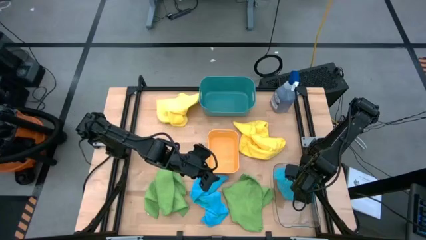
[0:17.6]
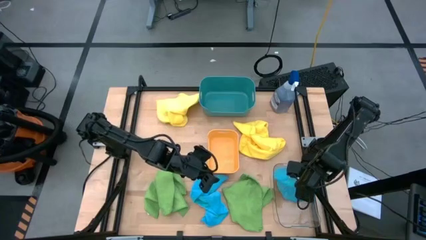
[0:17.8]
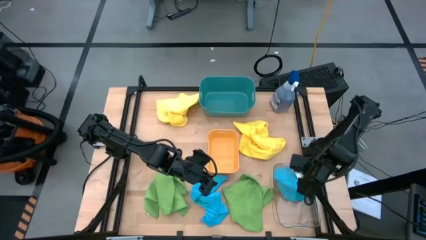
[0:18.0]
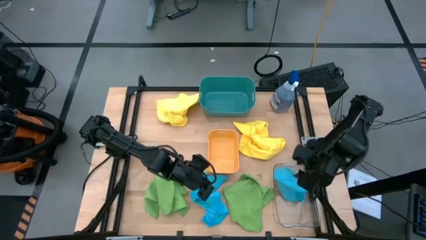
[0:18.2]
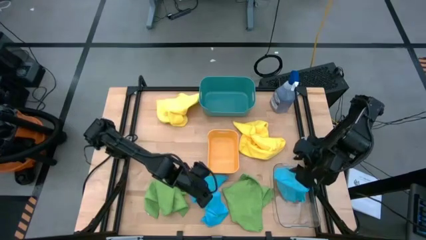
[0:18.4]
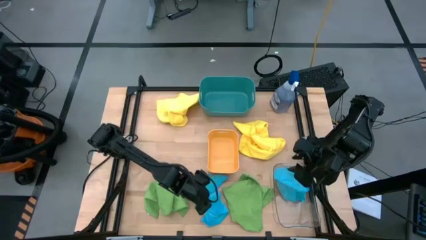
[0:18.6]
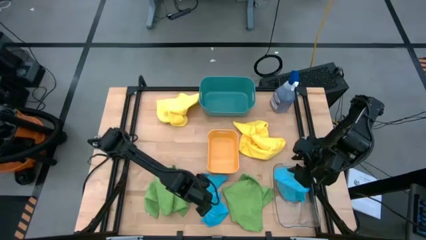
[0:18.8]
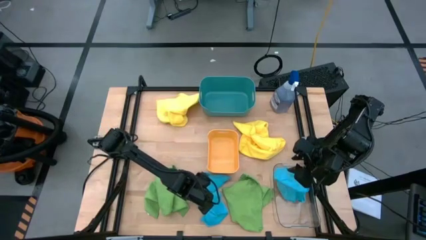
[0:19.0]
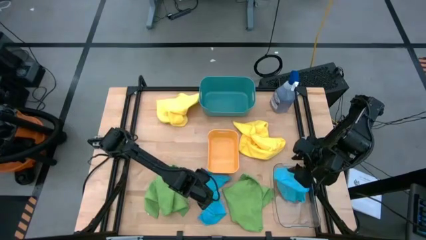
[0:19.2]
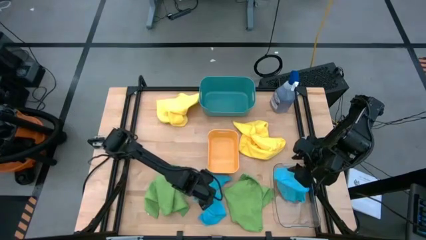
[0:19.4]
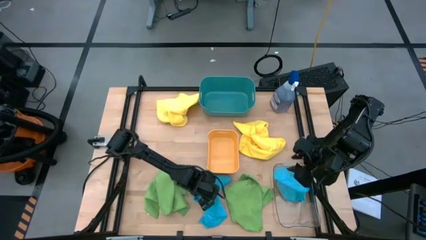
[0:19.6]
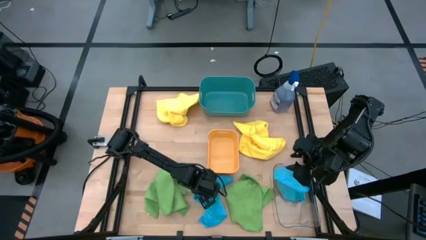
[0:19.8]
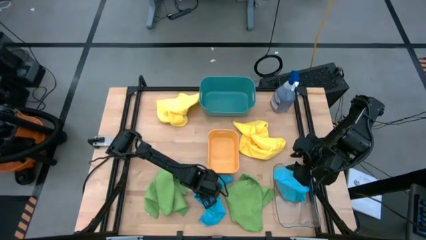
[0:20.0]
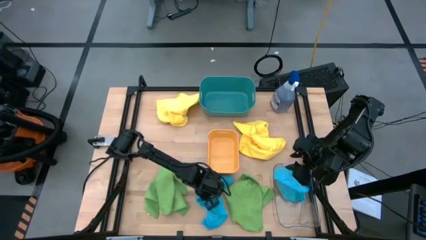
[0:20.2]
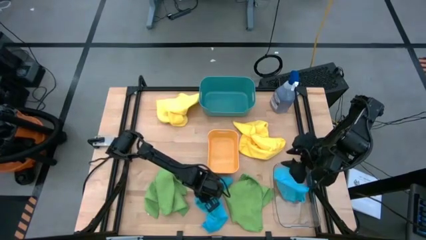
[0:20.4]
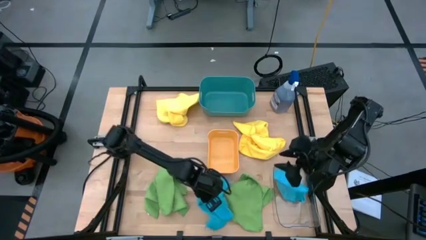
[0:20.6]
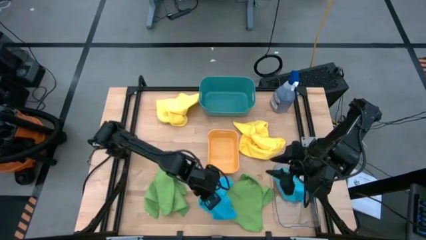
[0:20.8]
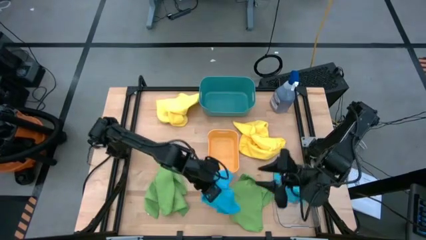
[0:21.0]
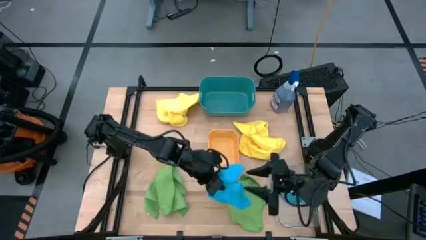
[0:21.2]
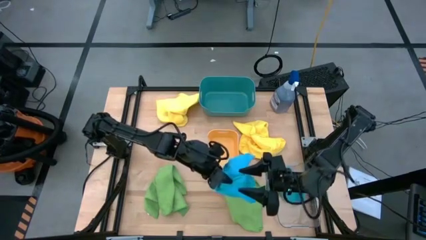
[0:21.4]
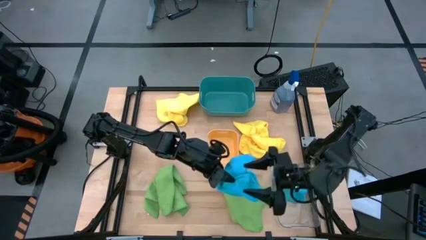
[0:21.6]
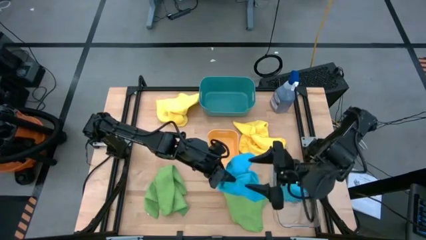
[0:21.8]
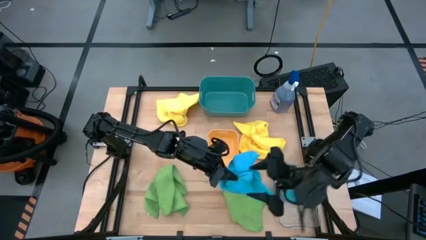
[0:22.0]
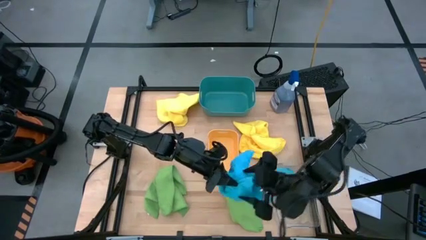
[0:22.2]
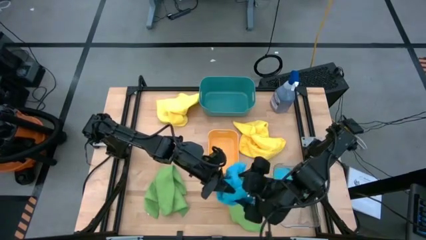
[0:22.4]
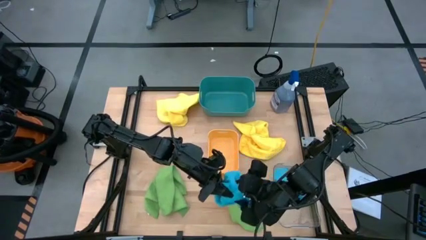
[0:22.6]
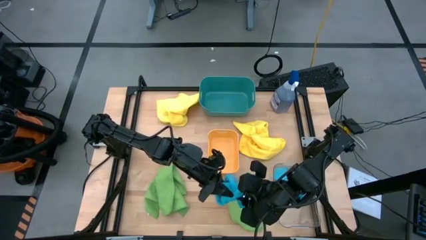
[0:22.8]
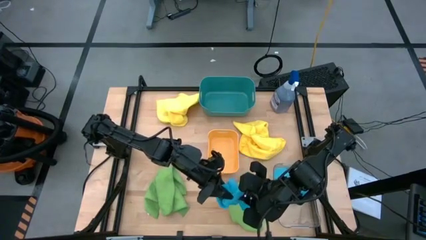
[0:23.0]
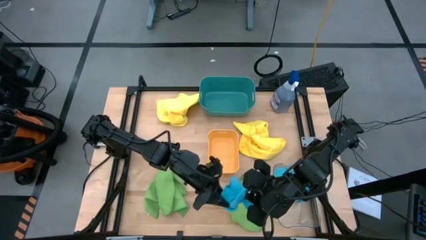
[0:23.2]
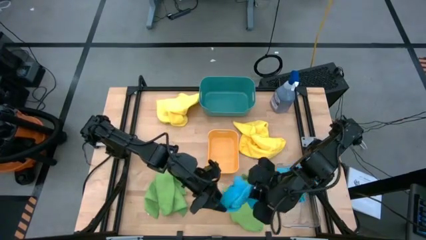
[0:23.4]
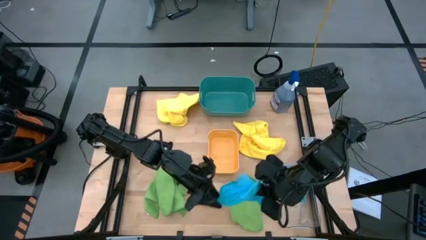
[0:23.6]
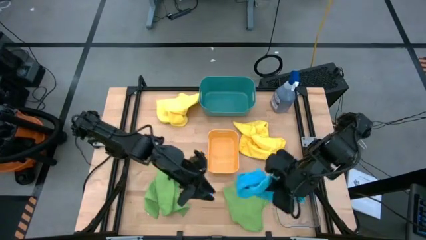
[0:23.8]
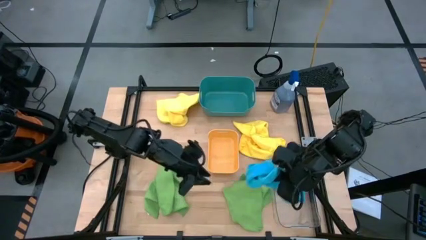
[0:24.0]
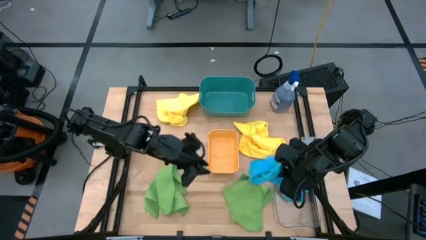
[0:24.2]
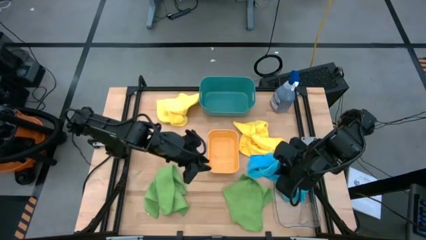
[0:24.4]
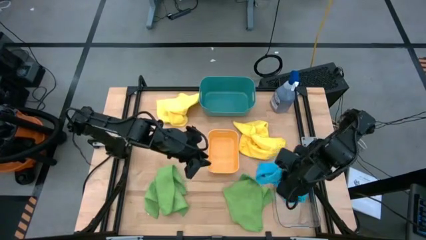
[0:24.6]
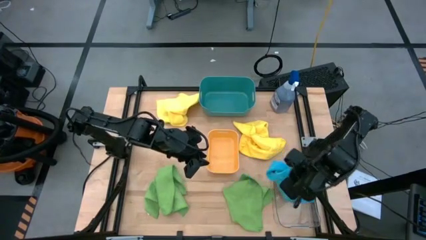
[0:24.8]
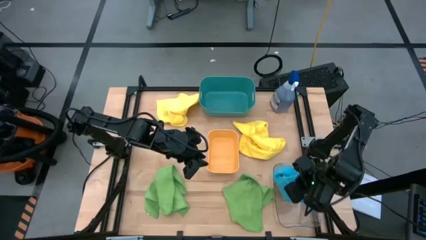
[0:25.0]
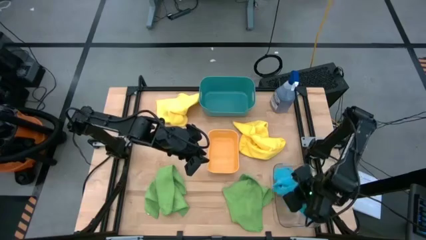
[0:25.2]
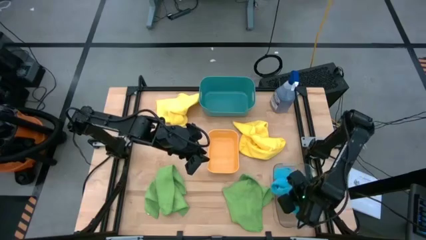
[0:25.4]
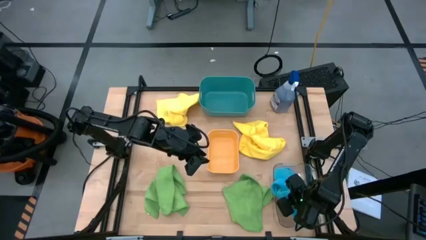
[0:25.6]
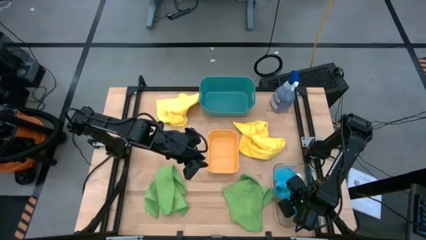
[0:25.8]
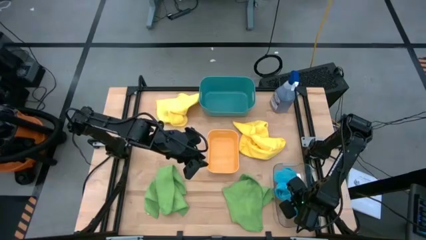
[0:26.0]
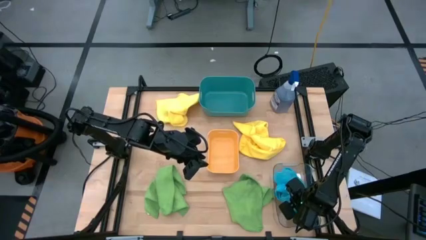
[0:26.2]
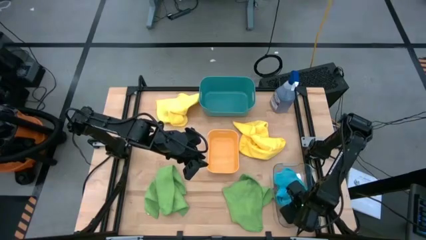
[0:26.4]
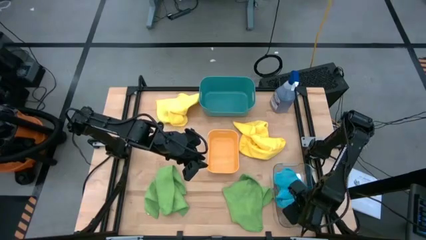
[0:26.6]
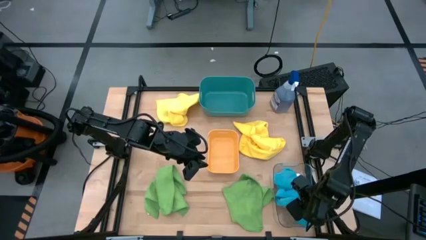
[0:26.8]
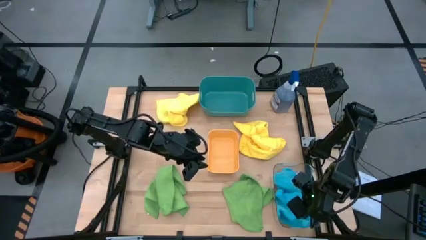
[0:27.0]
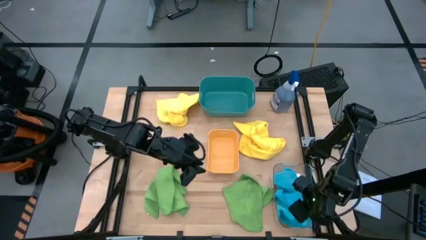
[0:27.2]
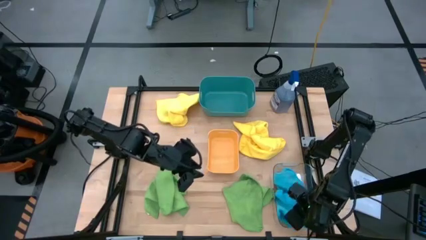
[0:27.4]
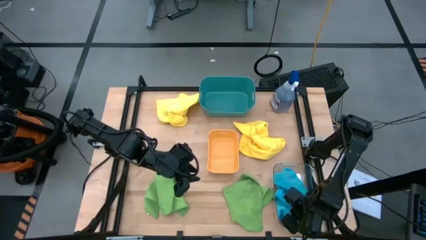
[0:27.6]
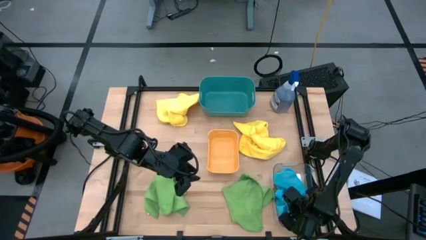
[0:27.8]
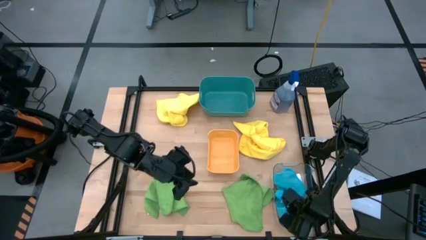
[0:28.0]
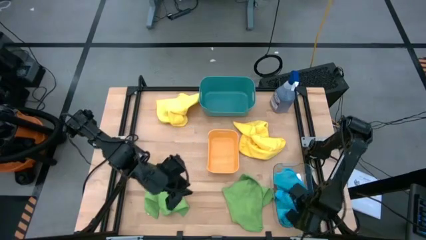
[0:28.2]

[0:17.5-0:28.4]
Task: Sort microfiber towel by color & place in baskets
Put the blue microfiber towel into the transparent bin
